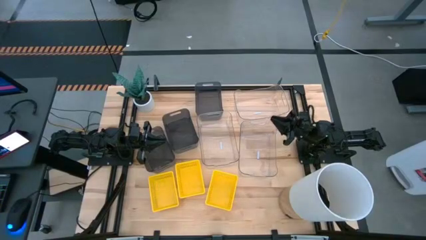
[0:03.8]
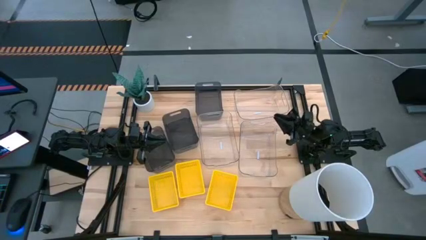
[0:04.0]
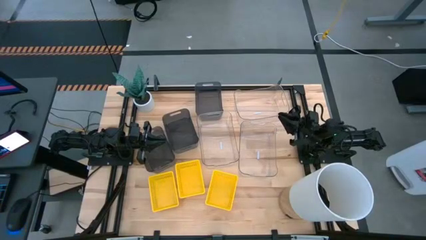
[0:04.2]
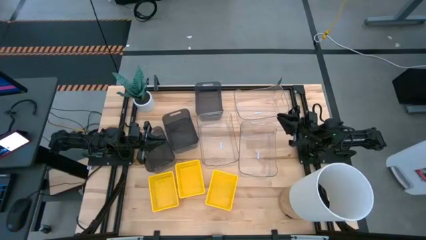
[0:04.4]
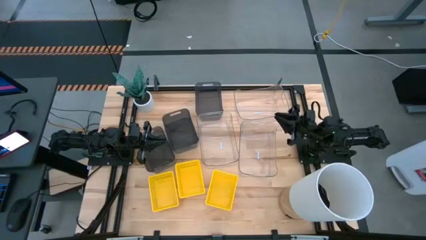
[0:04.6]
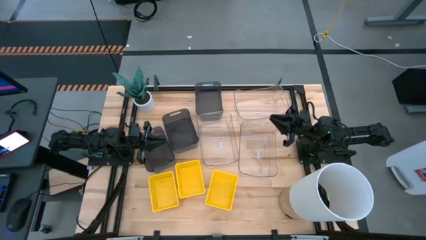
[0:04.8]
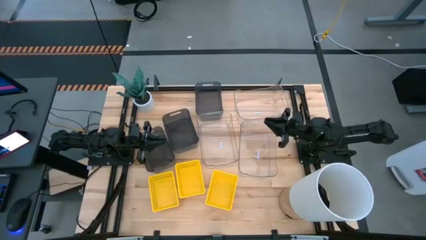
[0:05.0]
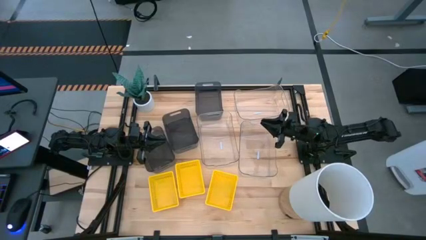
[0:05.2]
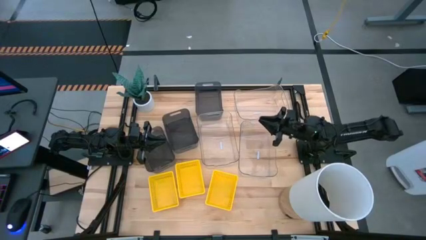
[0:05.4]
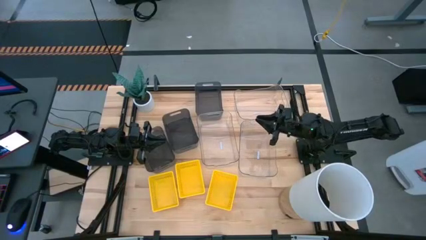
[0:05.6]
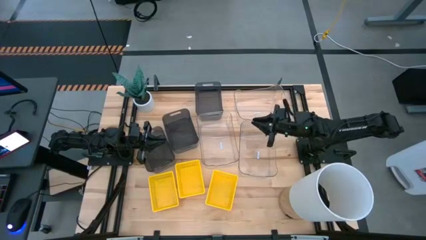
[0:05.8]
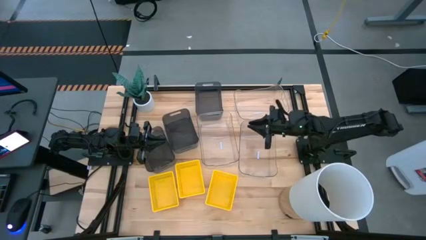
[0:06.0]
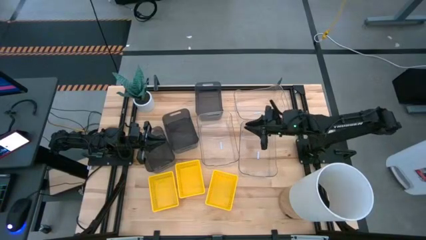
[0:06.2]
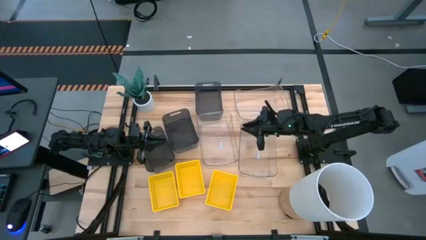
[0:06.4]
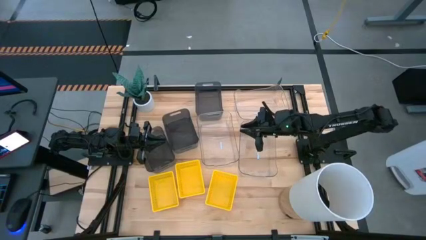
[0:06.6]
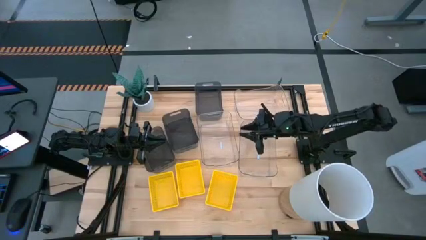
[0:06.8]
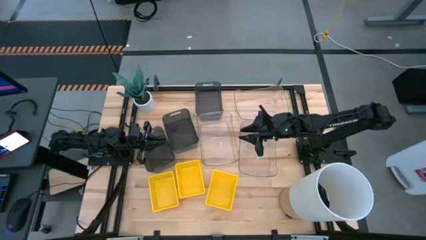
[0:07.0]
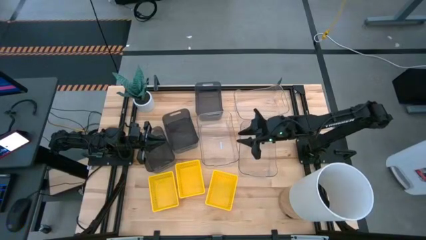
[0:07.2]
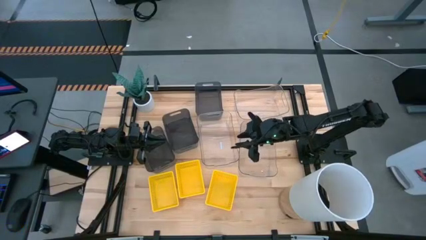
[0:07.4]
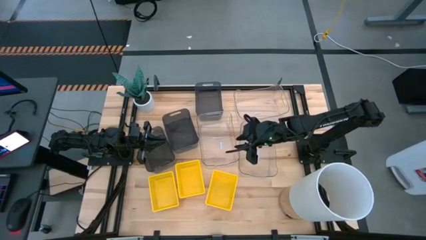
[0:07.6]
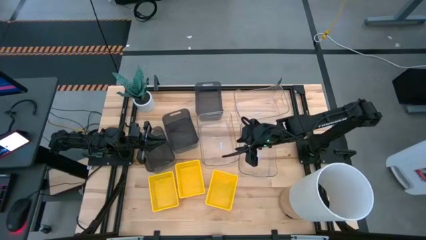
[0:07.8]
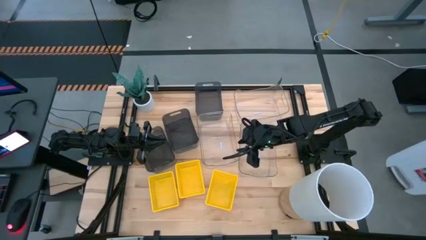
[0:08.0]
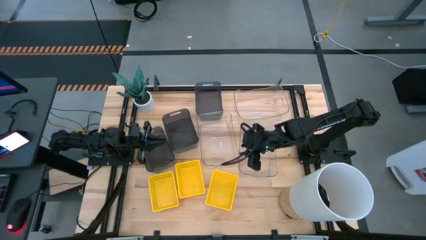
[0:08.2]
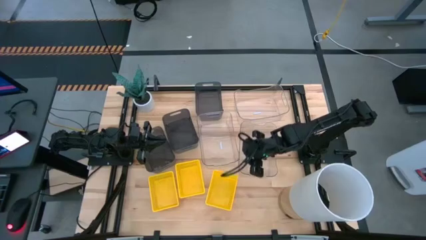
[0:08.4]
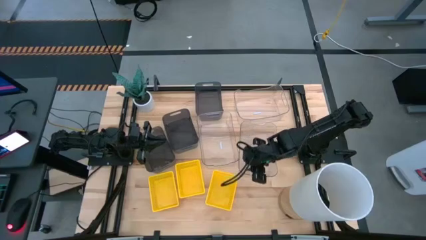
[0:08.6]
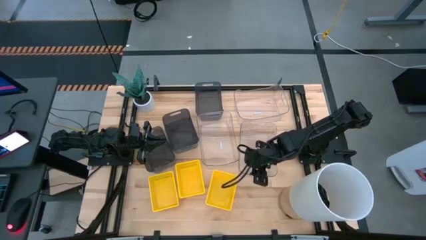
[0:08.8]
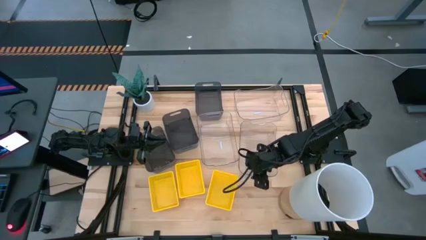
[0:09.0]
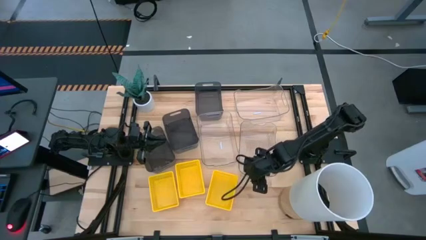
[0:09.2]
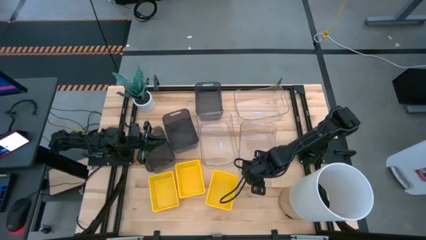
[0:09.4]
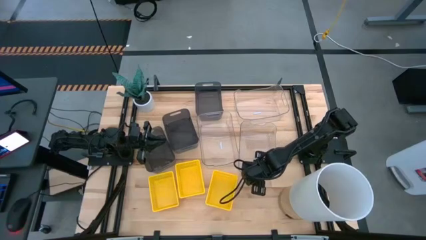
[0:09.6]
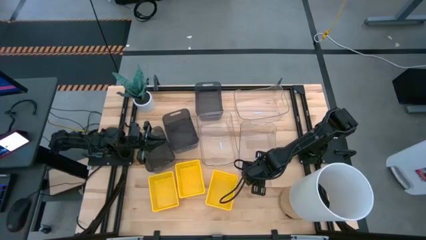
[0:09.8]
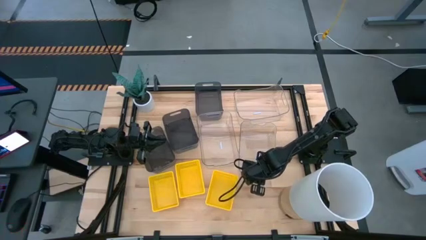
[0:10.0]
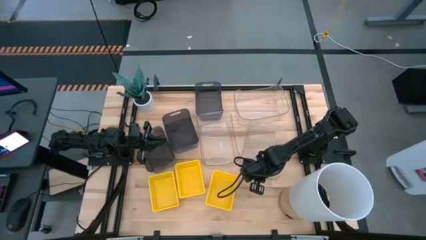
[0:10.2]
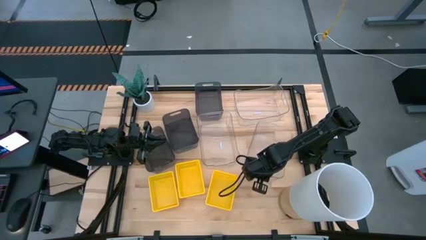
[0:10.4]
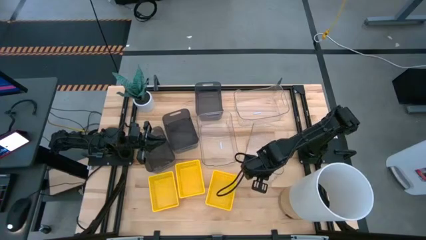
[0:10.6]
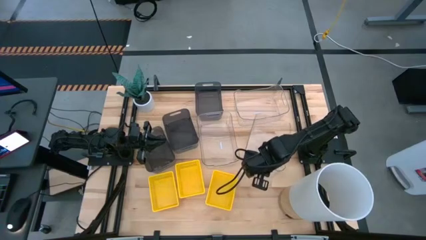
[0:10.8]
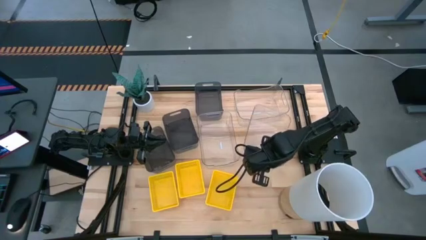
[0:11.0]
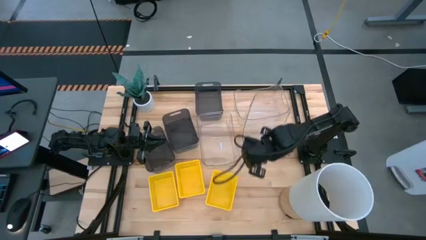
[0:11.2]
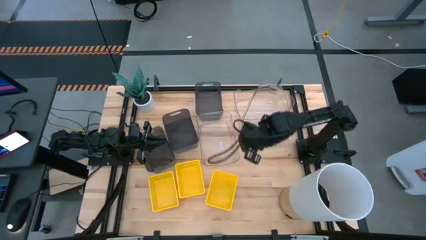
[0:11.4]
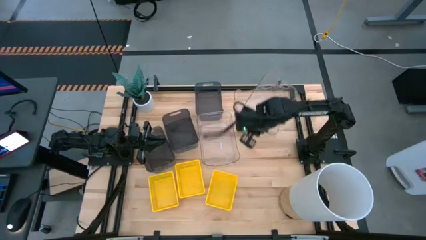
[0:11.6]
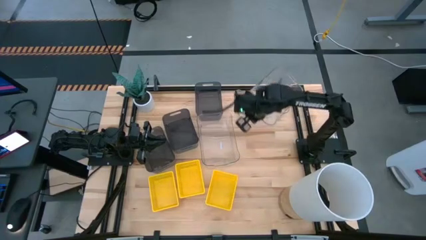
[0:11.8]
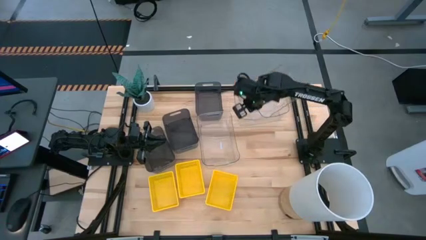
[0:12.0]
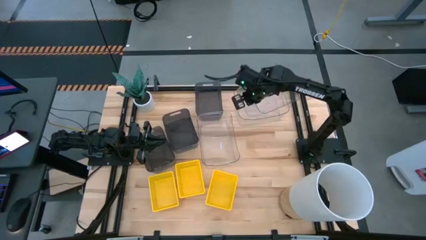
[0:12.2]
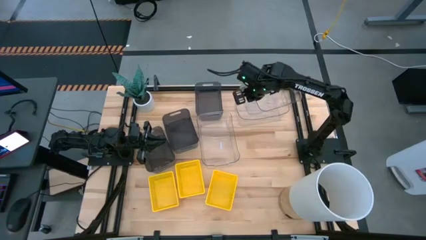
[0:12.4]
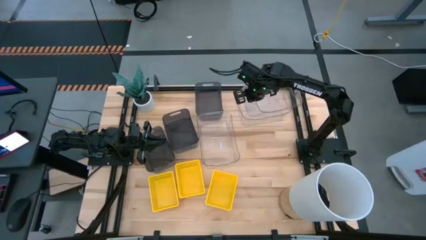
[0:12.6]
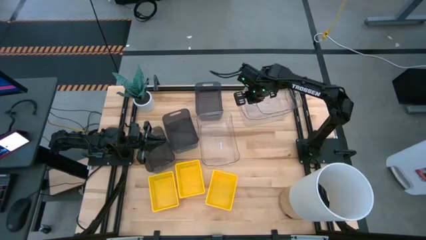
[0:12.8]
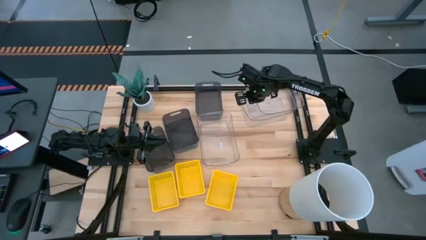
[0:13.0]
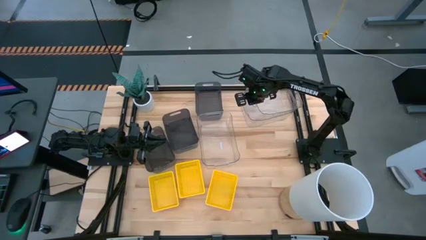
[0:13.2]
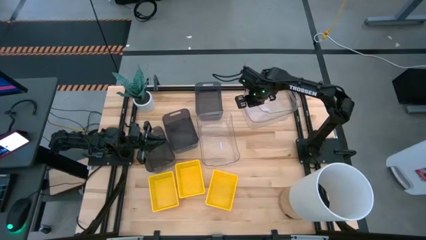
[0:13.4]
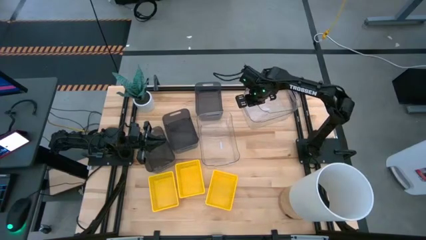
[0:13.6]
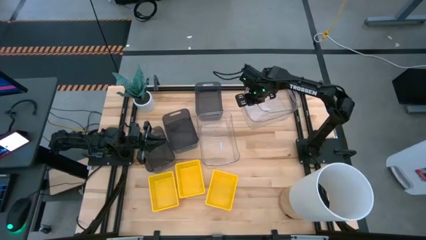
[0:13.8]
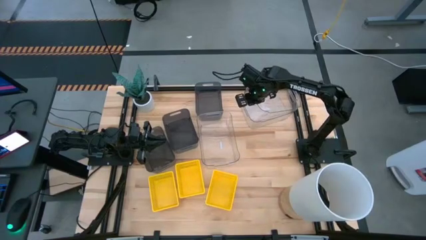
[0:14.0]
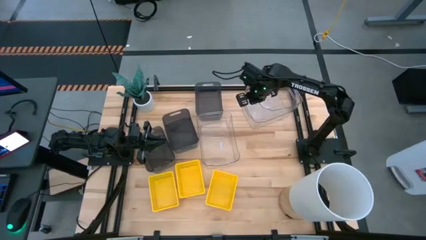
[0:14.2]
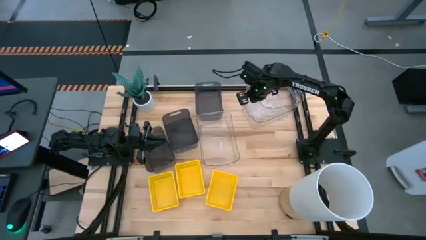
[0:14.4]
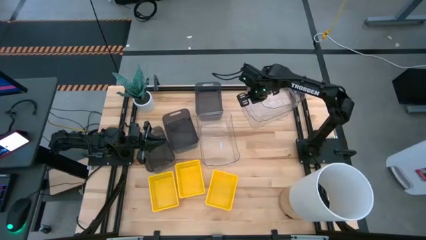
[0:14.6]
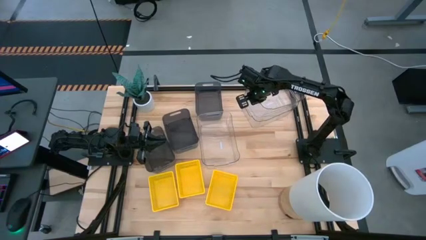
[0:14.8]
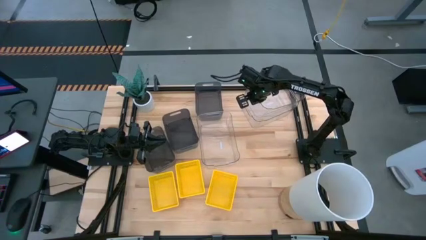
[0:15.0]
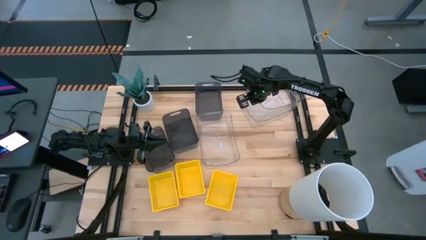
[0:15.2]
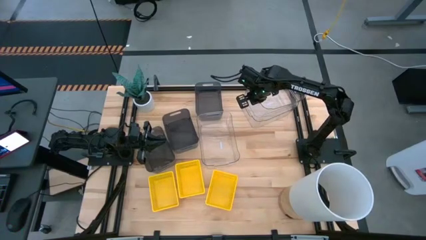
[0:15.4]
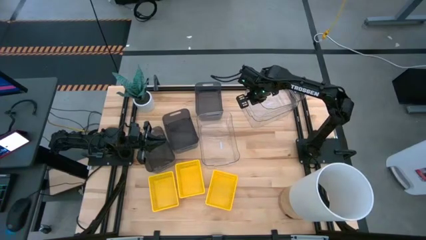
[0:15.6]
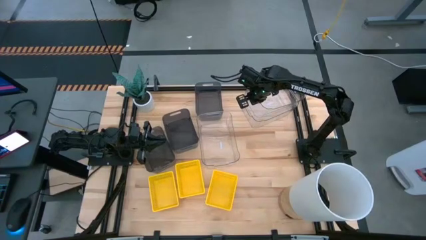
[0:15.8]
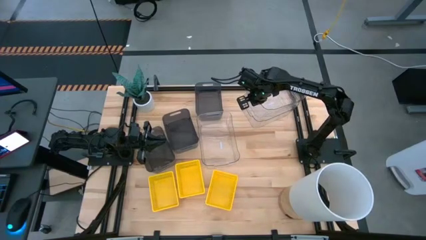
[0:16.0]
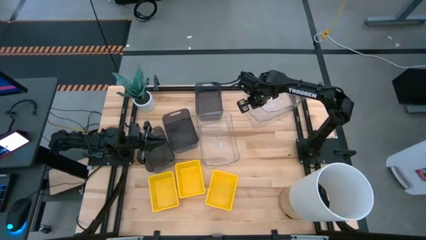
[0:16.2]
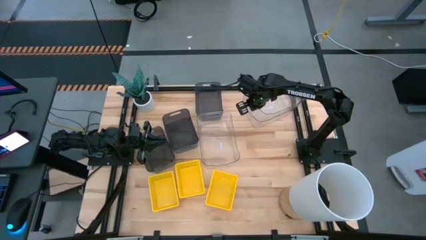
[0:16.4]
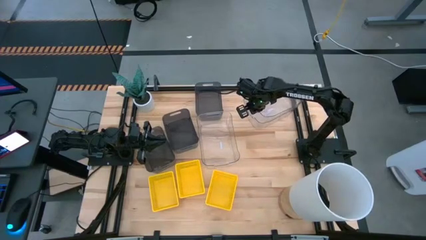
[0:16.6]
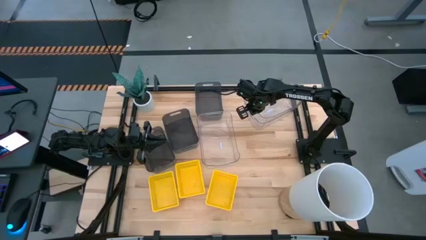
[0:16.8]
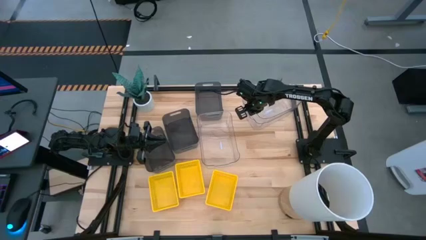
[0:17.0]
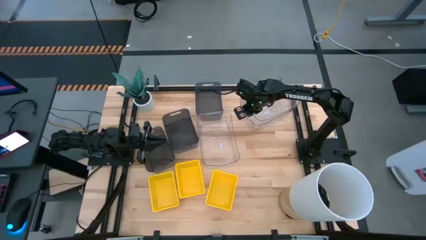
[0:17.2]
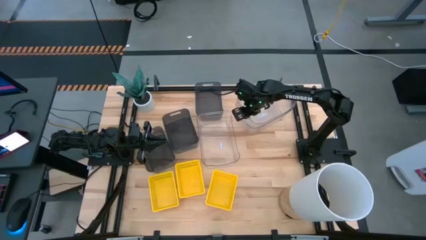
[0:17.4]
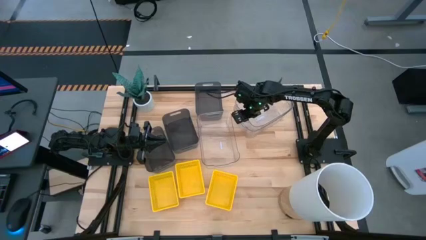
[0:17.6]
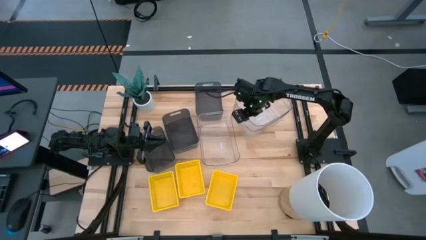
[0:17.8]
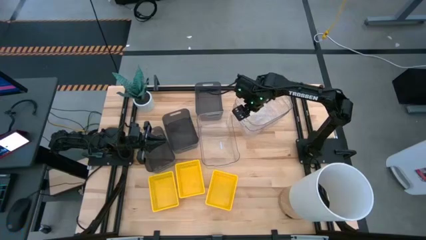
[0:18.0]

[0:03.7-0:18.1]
Stack the bottom right transparent bin on top of the top right transparent bin
